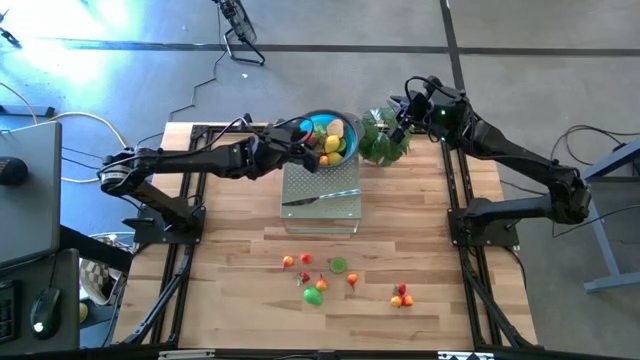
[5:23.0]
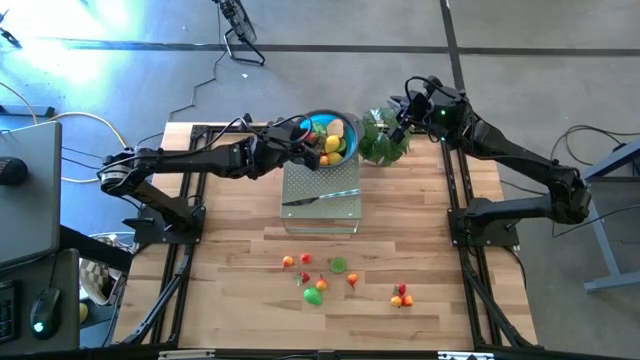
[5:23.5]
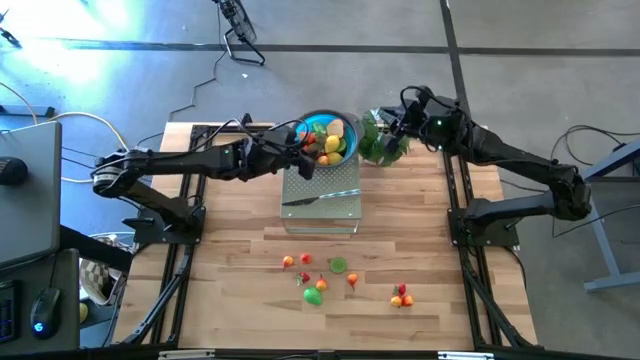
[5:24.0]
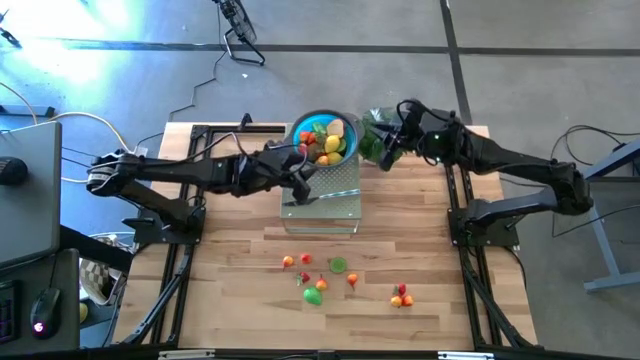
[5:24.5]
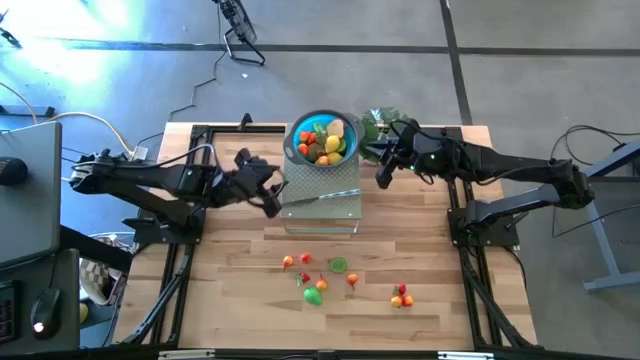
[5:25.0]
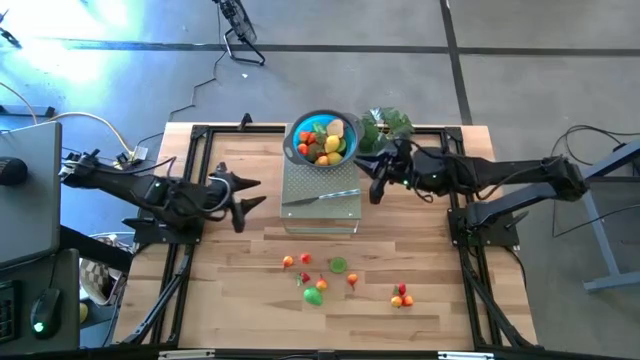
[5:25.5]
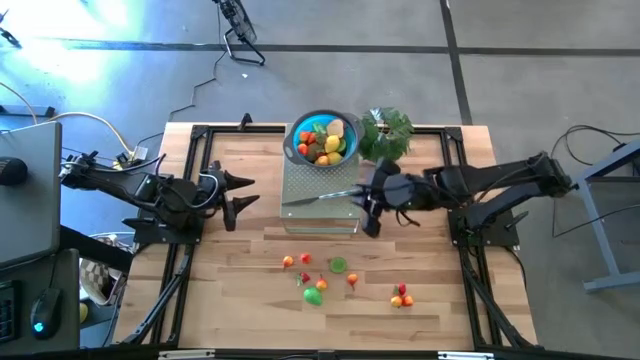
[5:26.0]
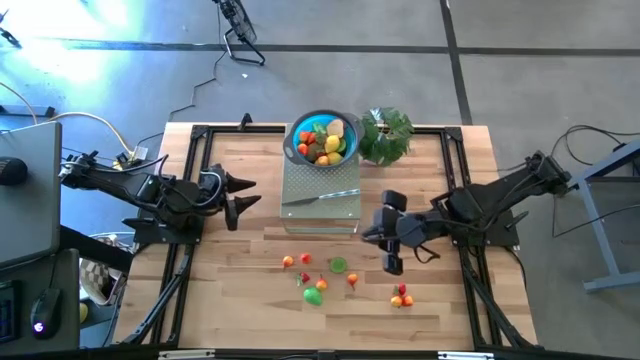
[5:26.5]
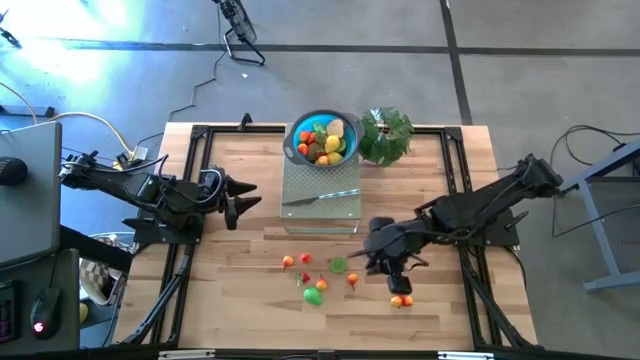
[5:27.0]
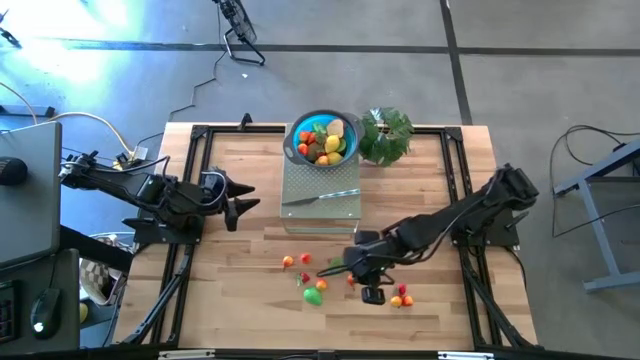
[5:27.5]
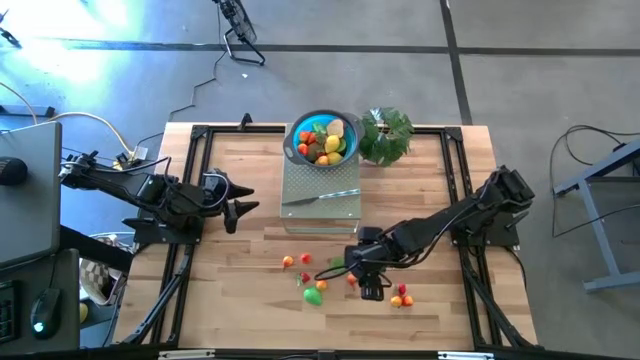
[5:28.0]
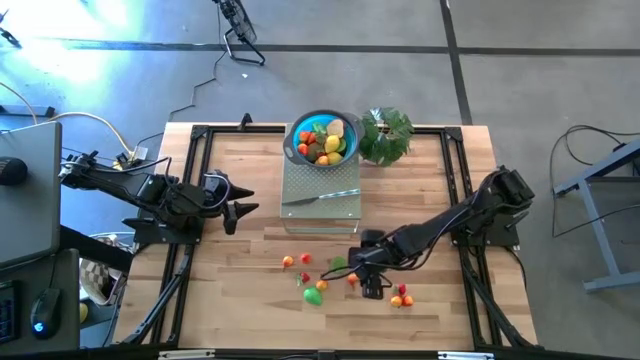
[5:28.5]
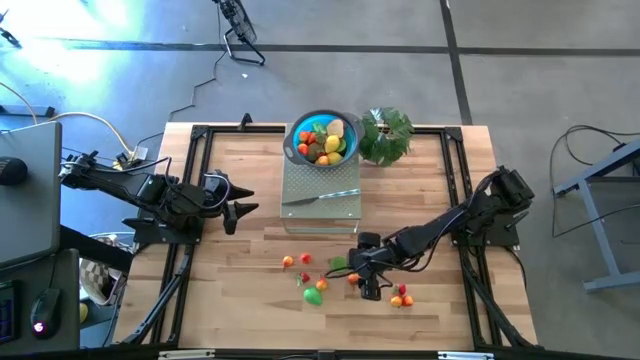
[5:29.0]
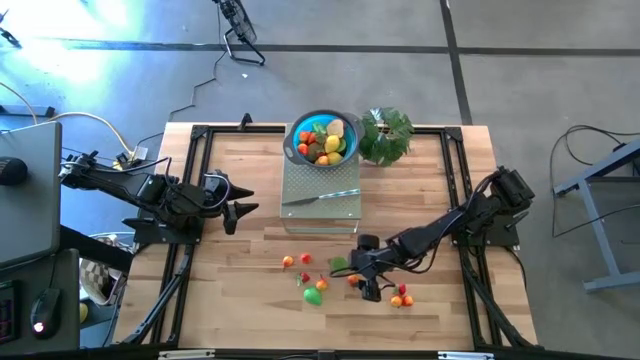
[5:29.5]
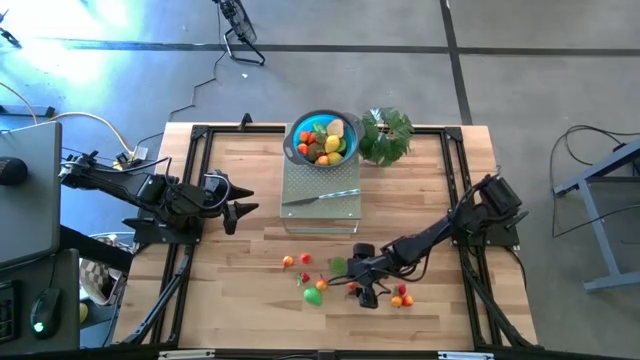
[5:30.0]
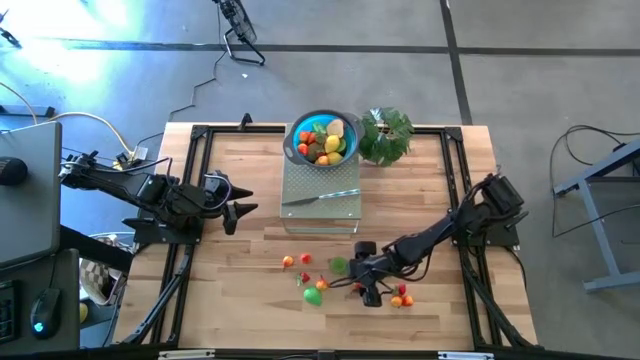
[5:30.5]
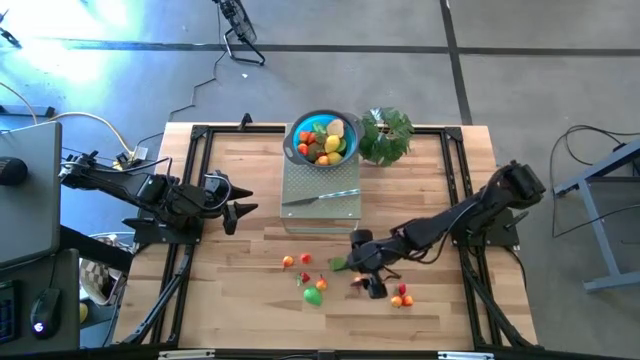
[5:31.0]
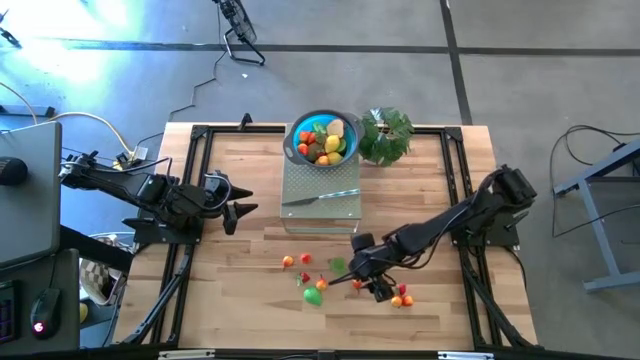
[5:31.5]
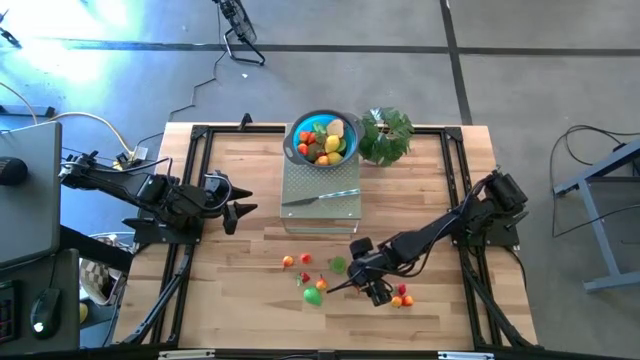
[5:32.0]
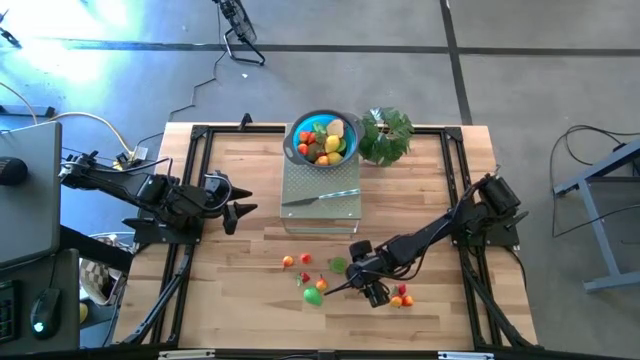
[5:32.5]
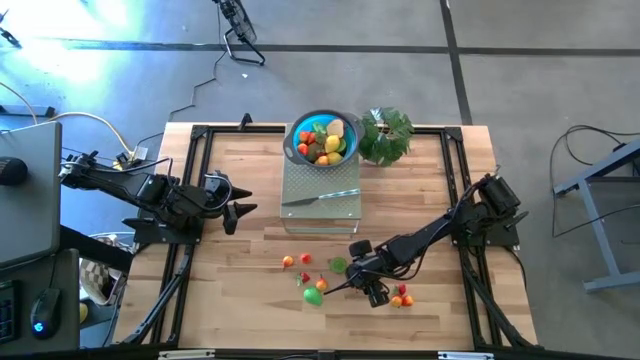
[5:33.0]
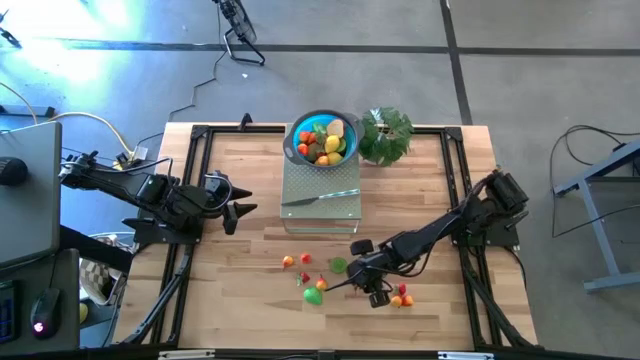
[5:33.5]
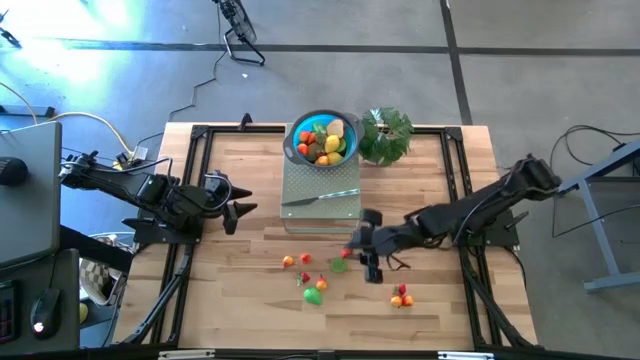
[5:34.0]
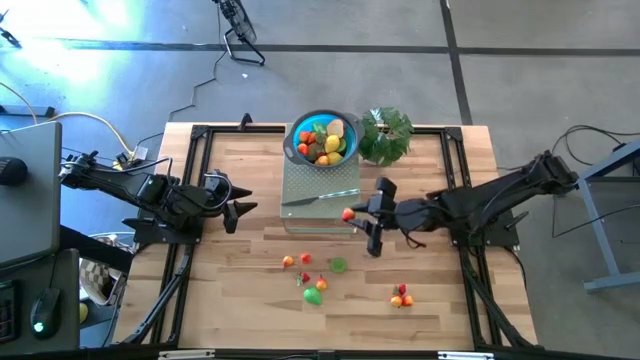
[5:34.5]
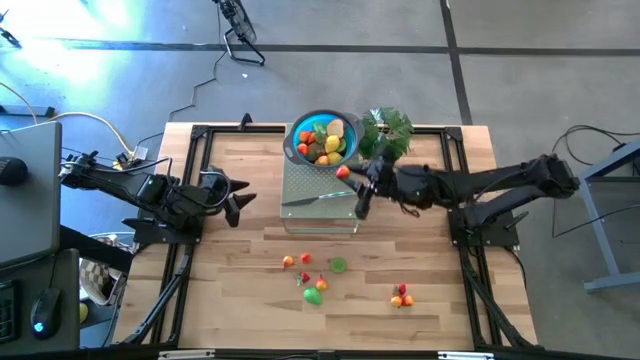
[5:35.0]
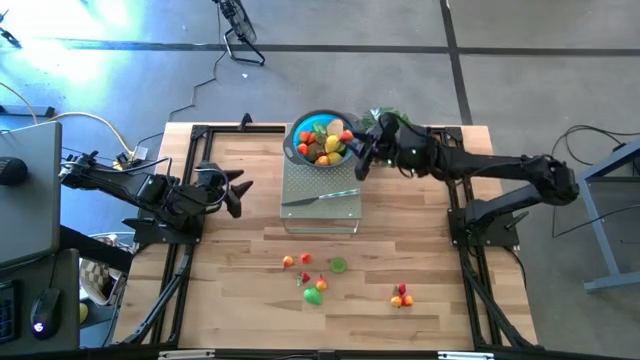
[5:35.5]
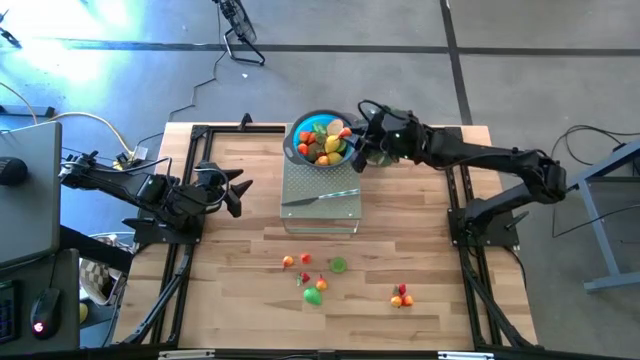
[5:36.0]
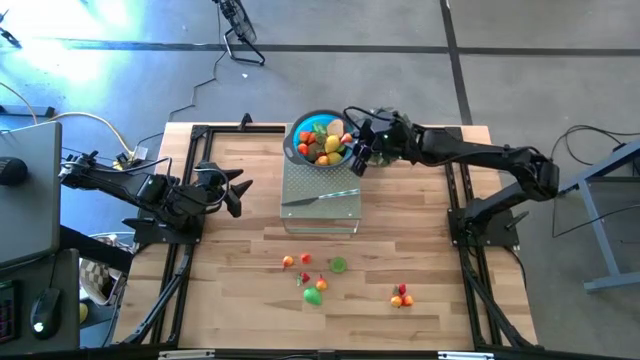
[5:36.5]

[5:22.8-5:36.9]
Task: Pick & Place Fruit
Put the orange peach in the blue bowl on the shelf

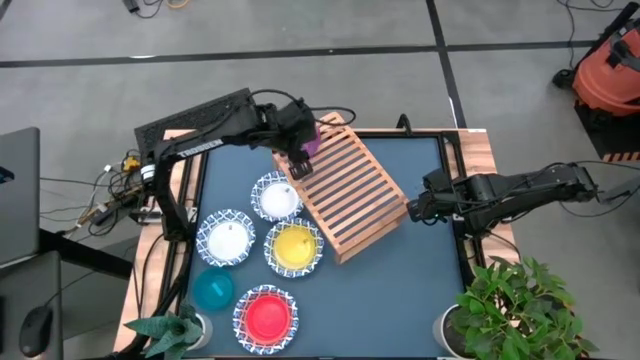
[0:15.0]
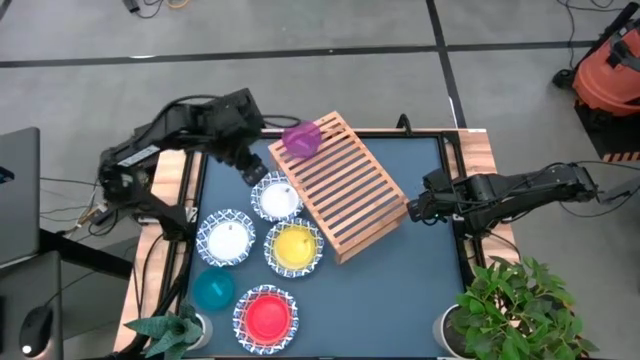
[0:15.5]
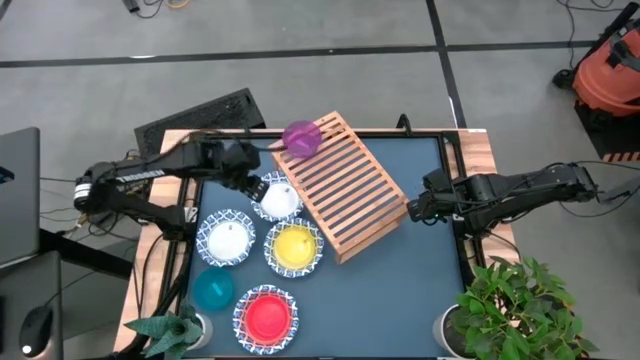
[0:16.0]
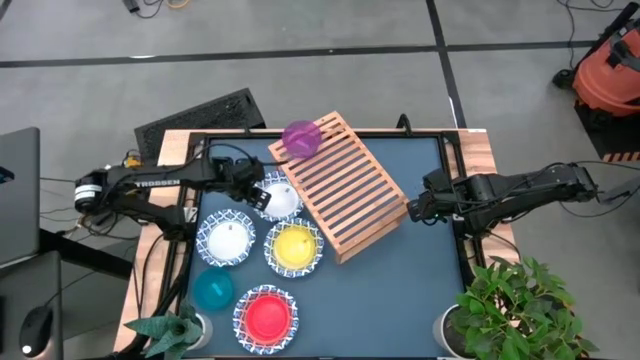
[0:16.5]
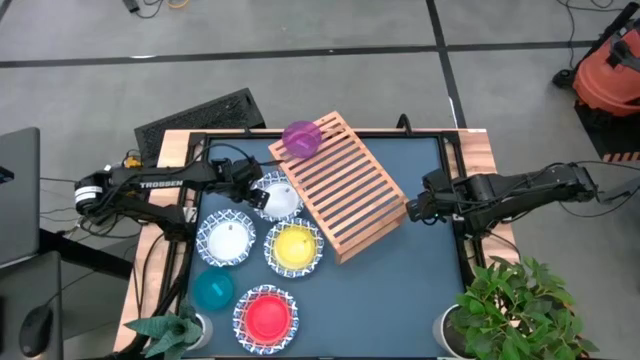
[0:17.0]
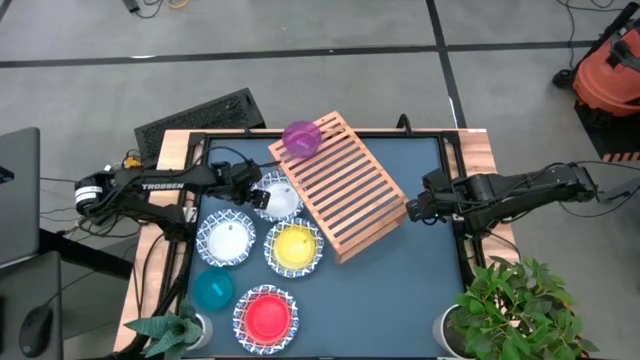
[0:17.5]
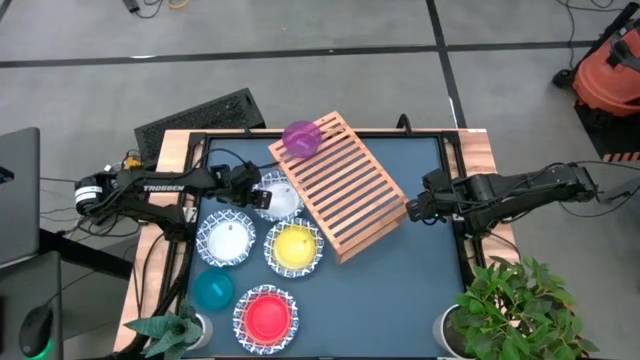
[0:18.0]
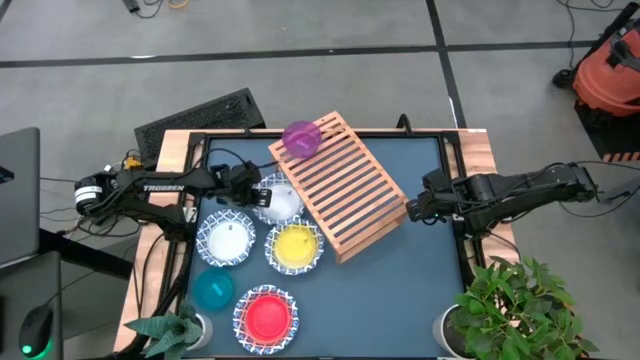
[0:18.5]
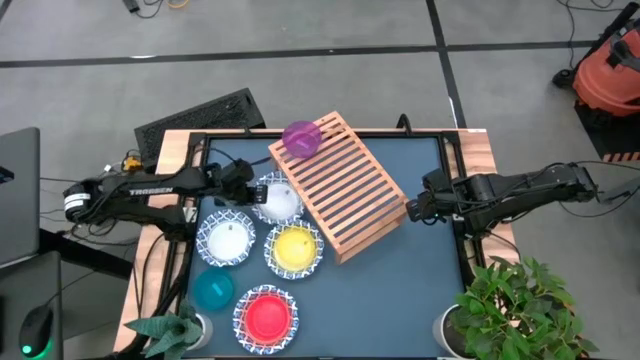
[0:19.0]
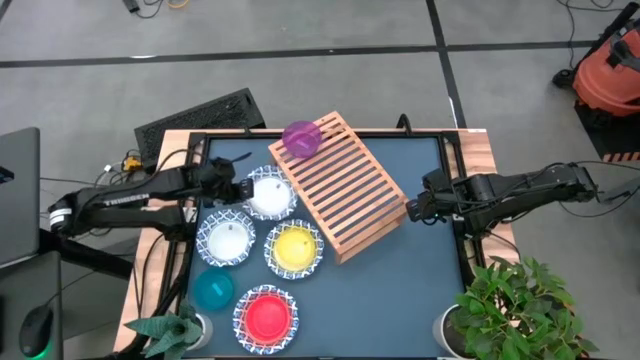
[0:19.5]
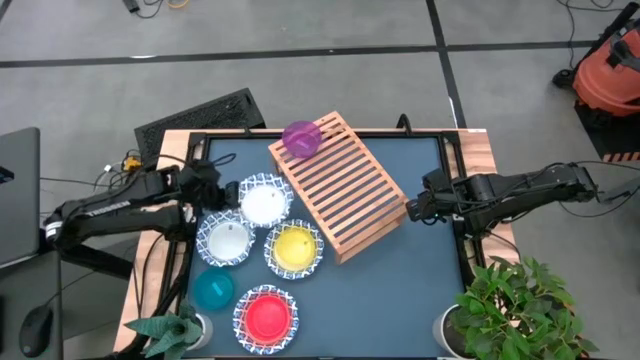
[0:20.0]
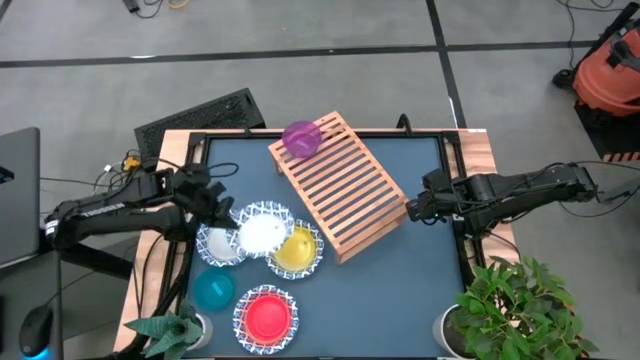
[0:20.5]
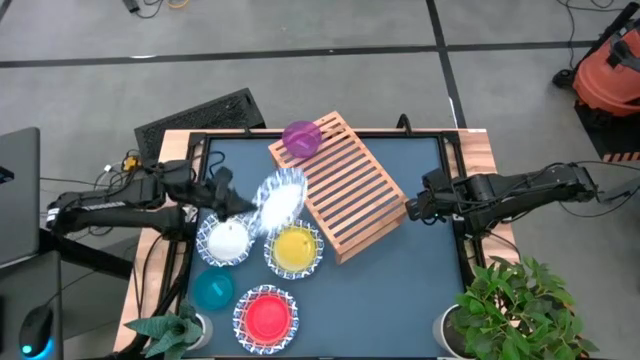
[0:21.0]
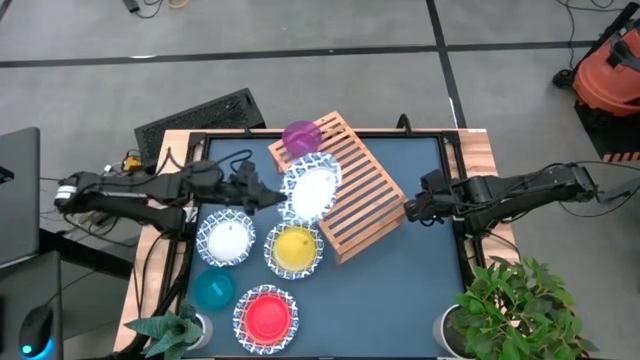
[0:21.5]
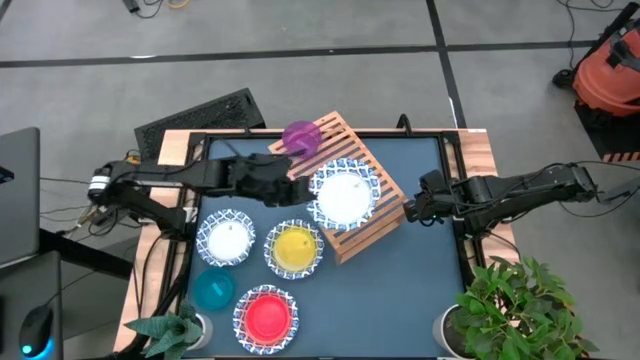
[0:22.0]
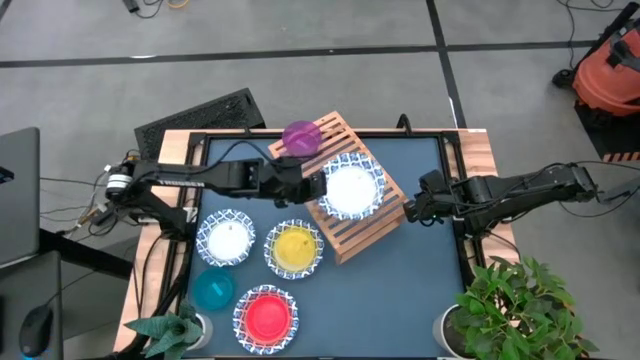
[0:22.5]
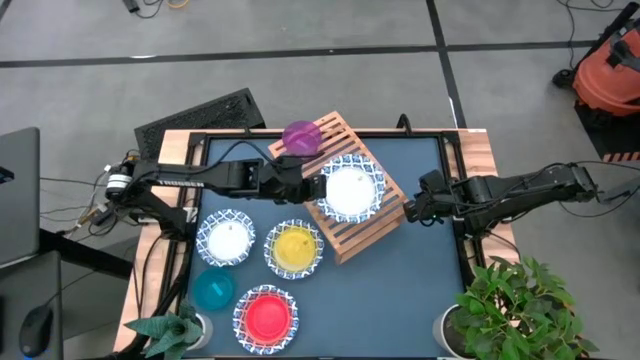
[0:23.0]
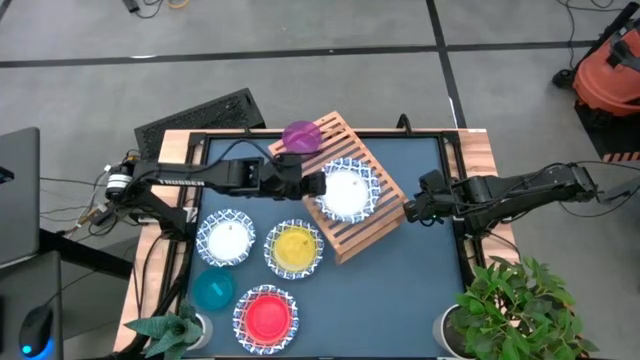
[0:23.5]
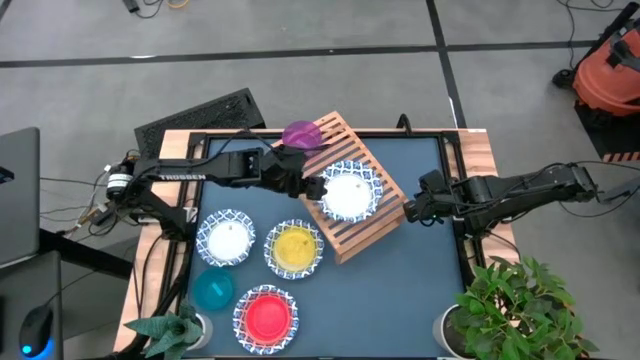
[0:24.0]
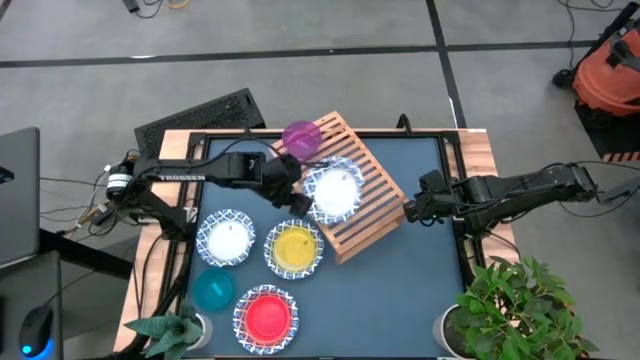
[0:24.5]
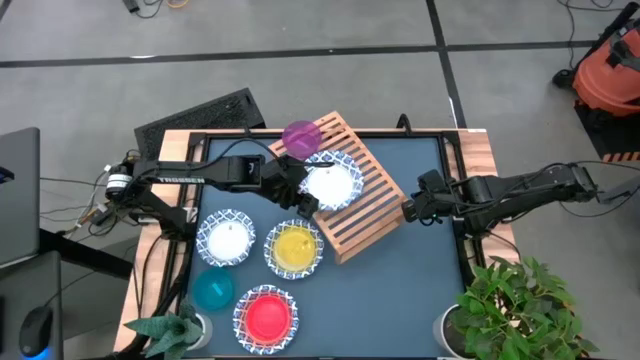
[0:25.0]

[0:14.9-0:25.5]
Task: Place and stack bowls onto a shelf
Put the white bowl on the shelf
